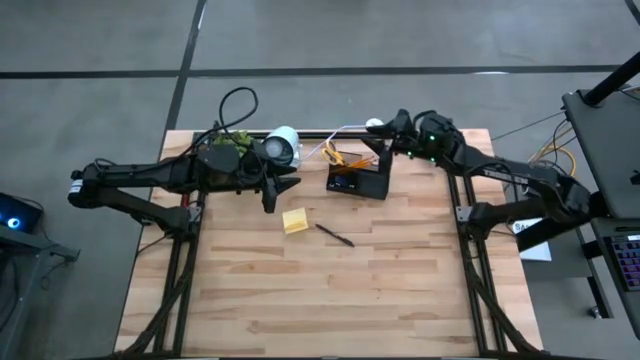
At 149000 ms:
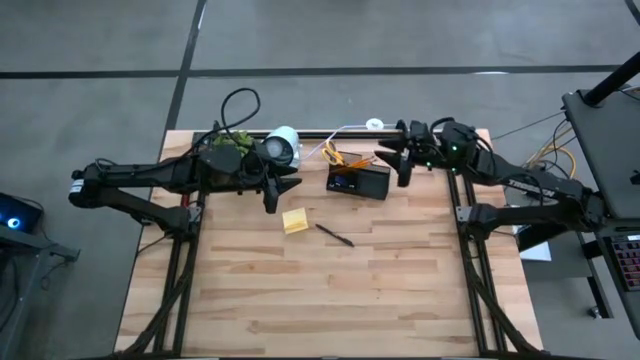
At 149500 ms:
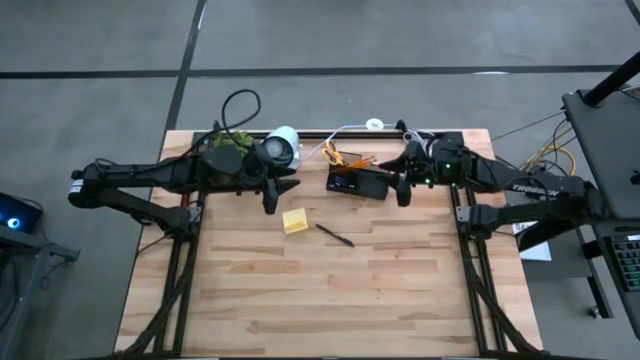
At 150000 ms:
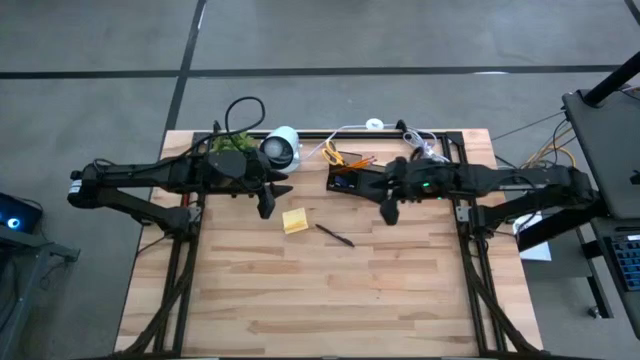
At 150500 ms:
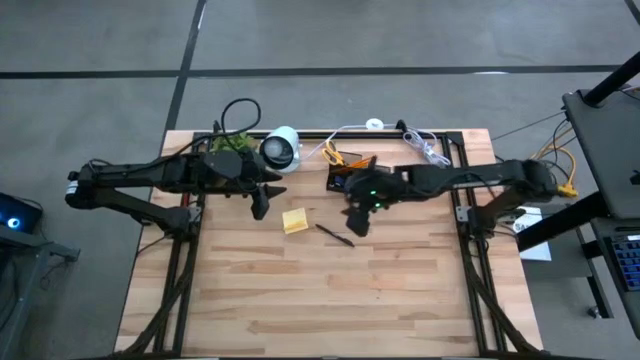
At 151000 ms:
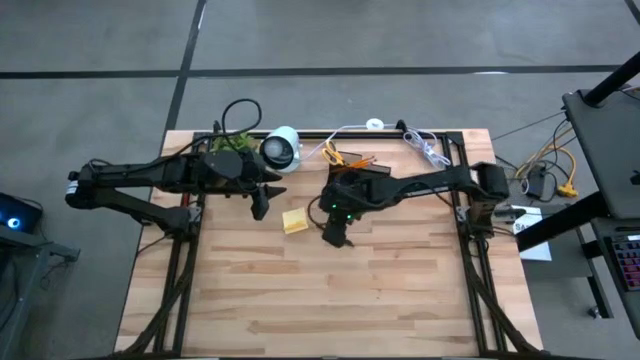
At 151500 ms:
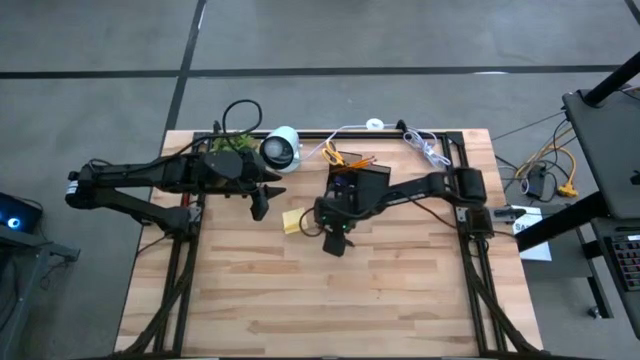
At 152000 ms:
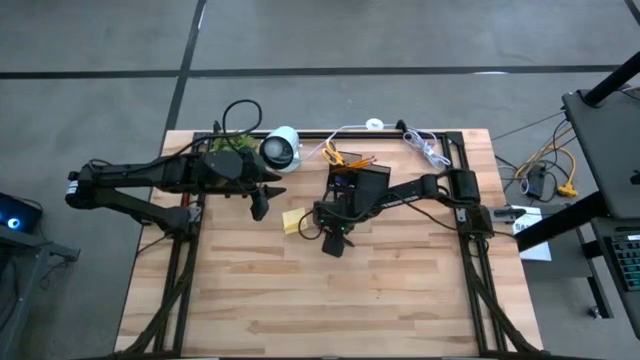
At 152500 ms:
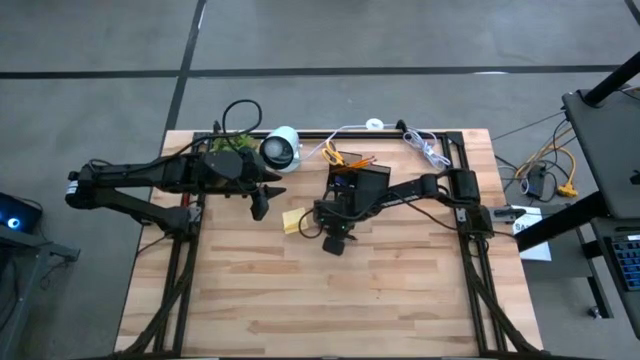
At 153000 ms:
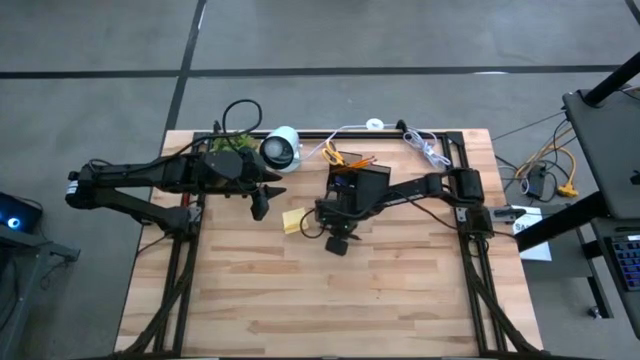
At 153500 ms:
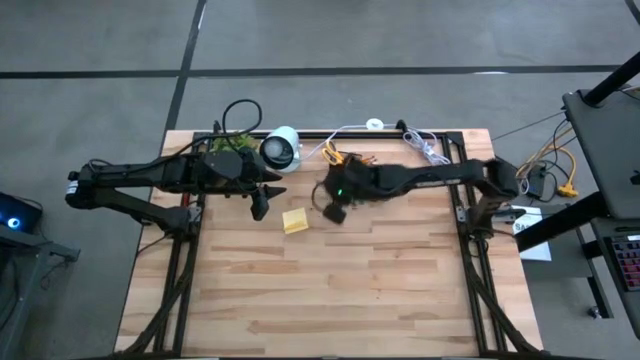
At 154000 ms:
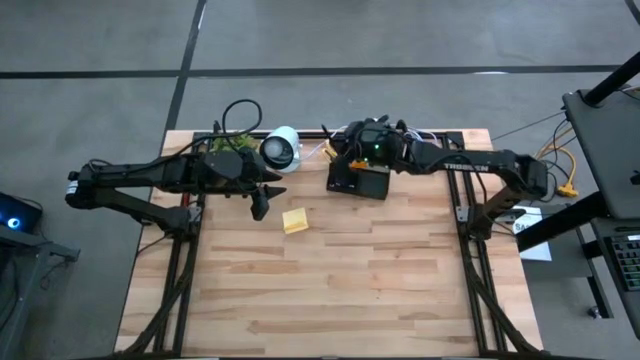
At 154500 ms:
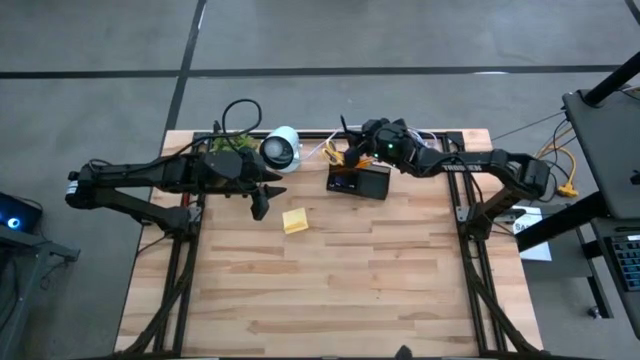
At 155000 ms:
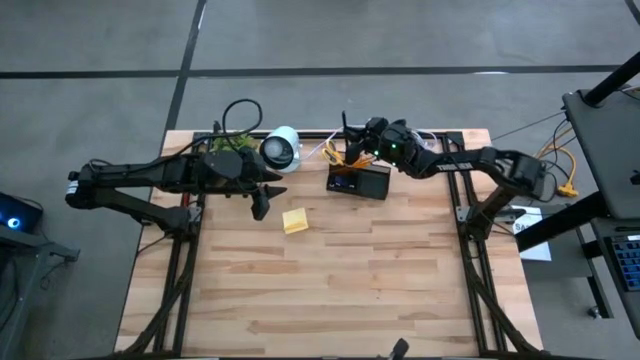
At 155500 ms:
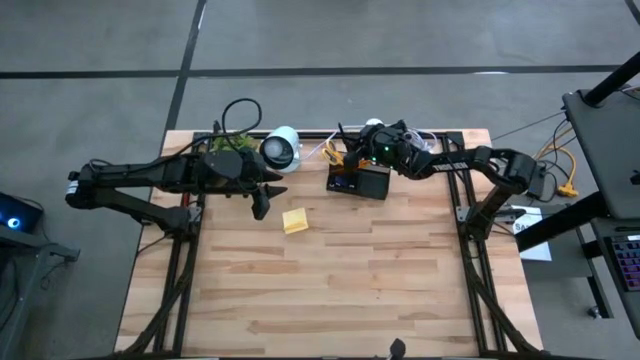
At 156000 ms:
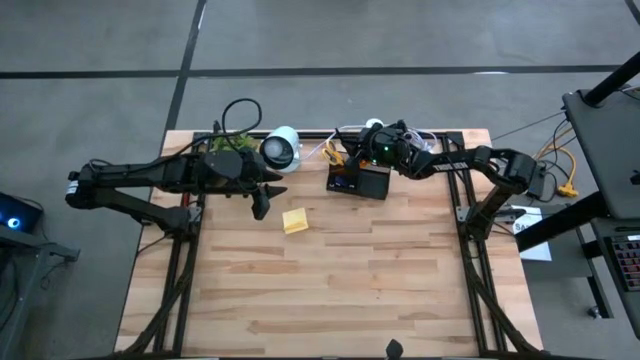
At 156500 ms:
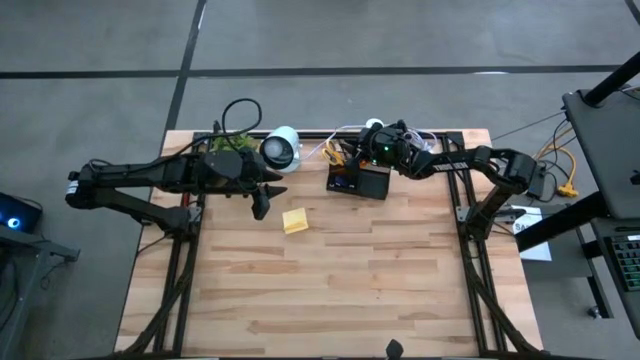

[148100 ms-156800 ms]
Task: Pick and place office supplies into organizer
Put the pen into the desk organizer

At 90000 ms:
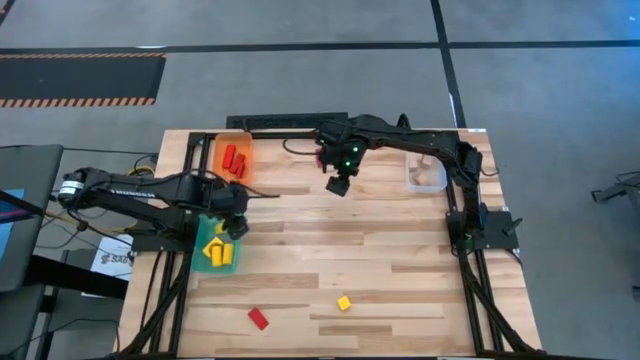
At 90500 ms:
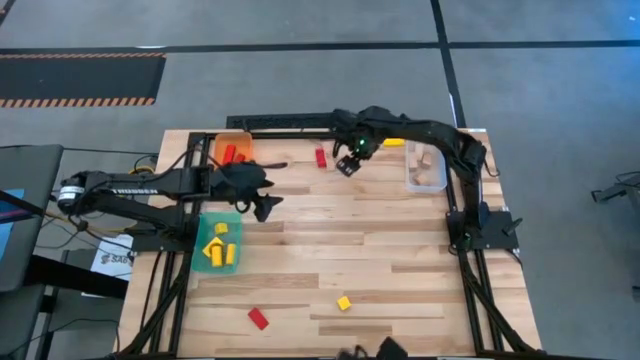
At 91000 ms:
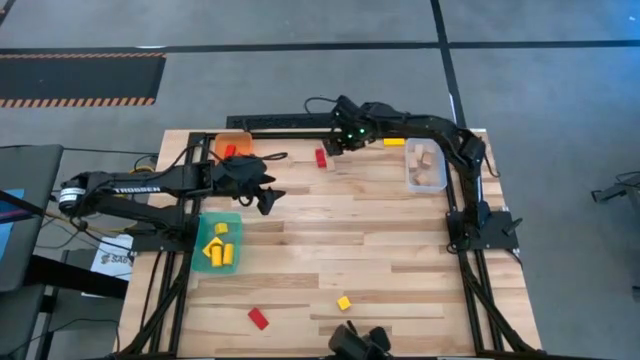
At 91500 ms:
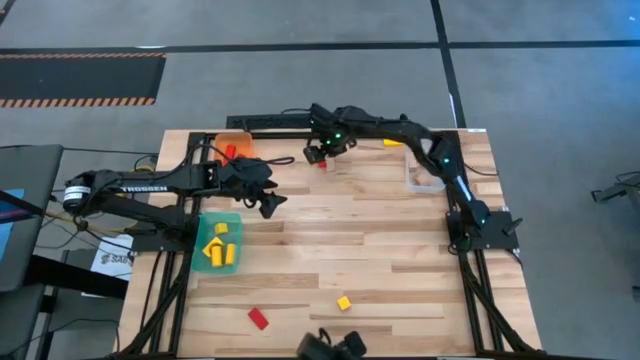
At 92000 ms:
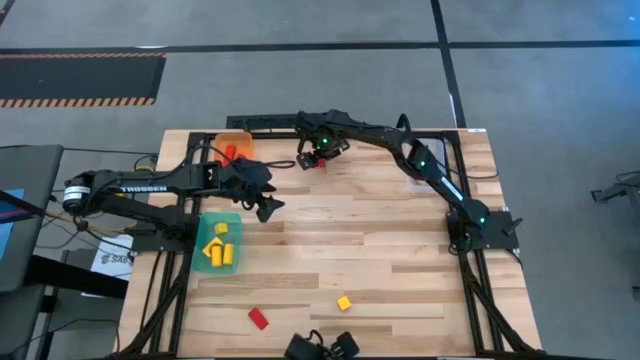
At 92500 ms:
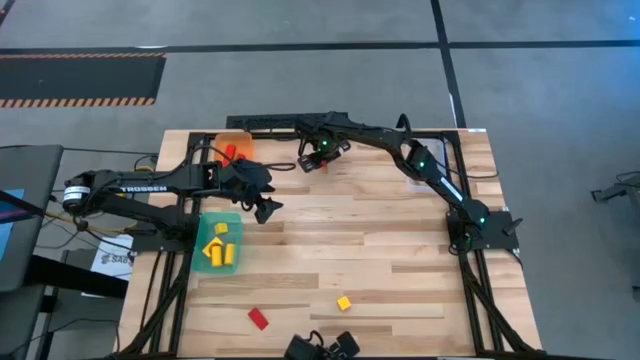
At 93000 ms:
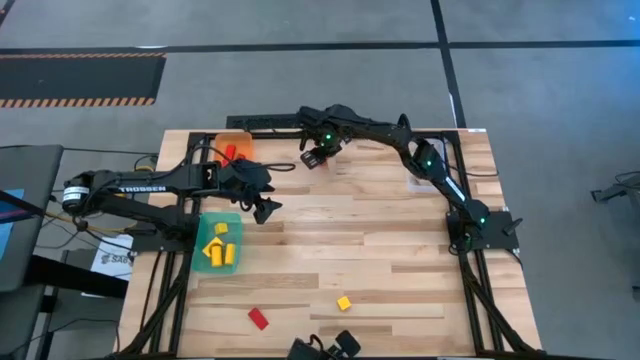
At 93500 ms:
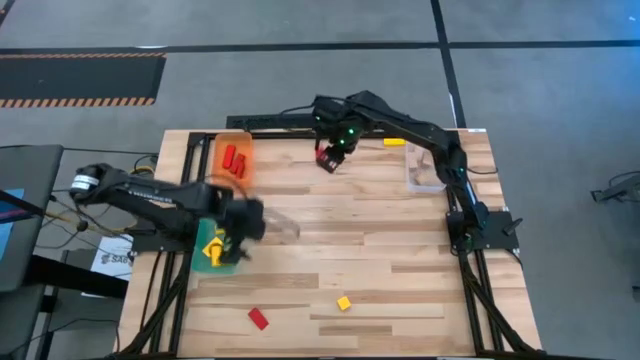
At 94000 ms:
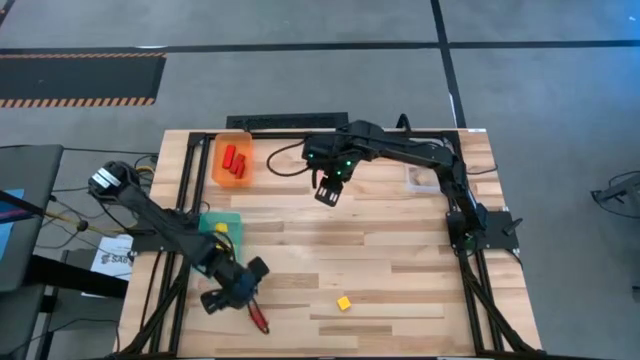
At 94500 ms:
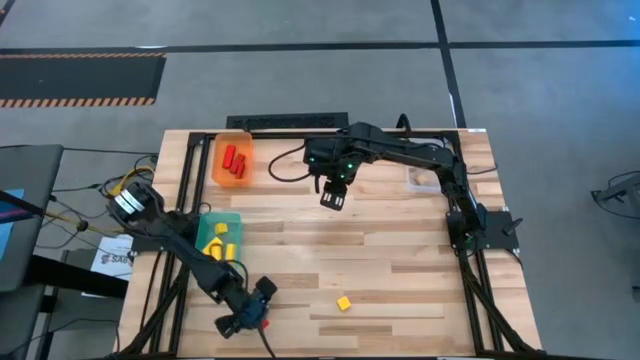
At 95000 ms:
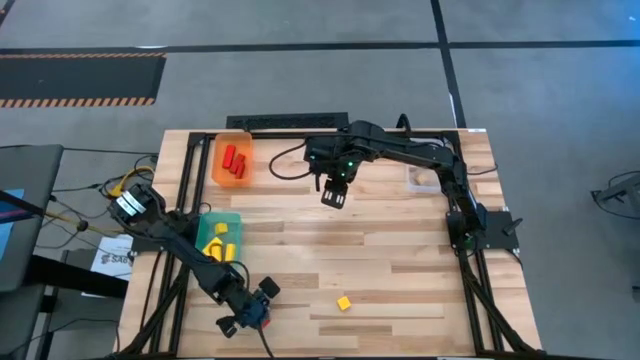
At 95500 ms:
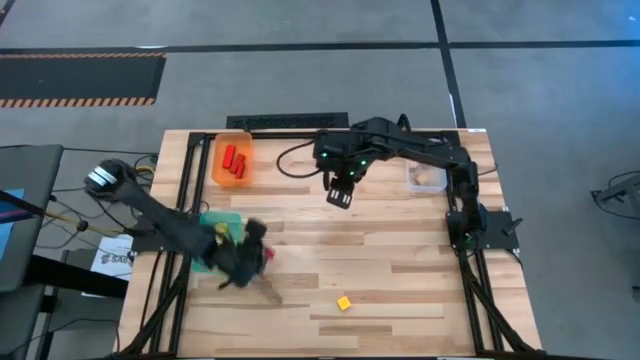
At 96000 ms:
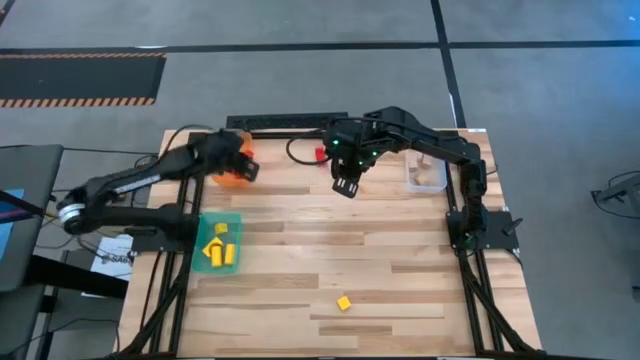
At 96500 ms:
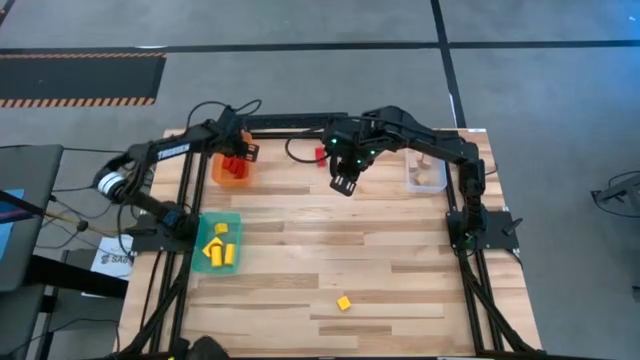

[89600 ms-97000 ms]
Task: Sort & place blocks by color
Put the red wooden block into the orange bin

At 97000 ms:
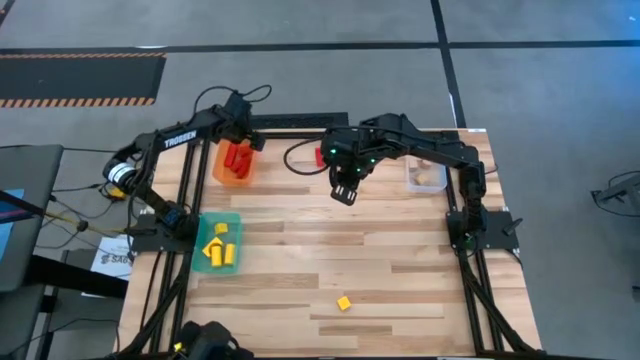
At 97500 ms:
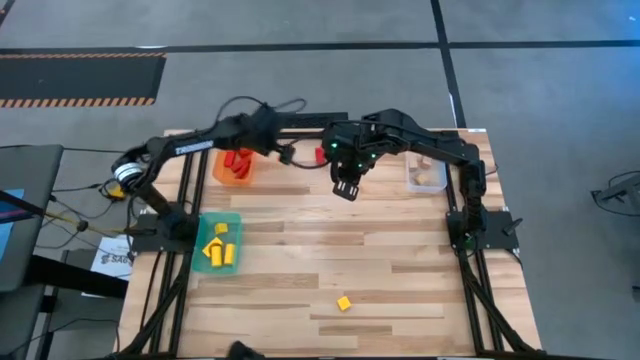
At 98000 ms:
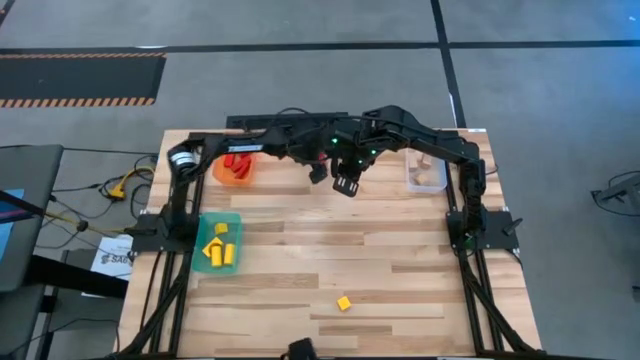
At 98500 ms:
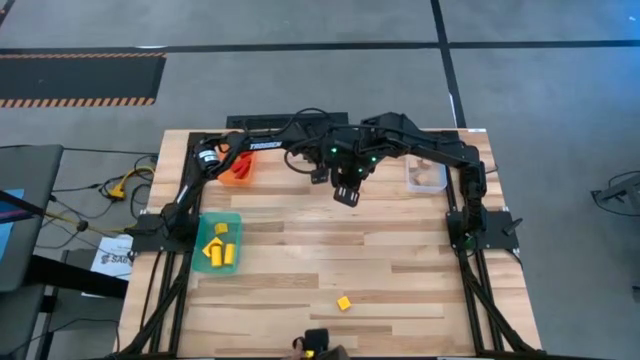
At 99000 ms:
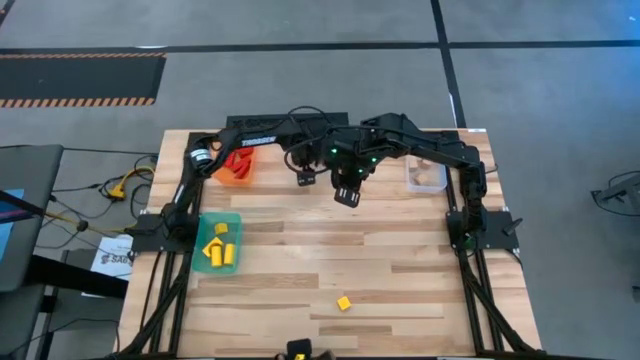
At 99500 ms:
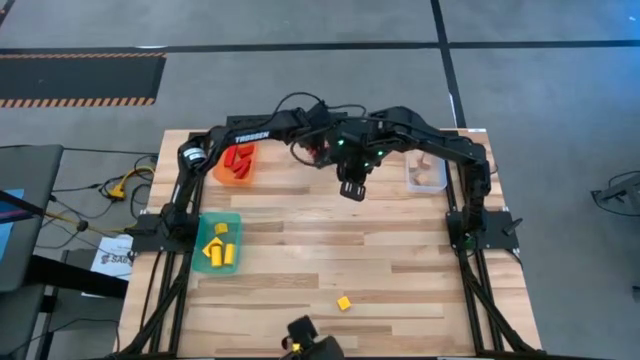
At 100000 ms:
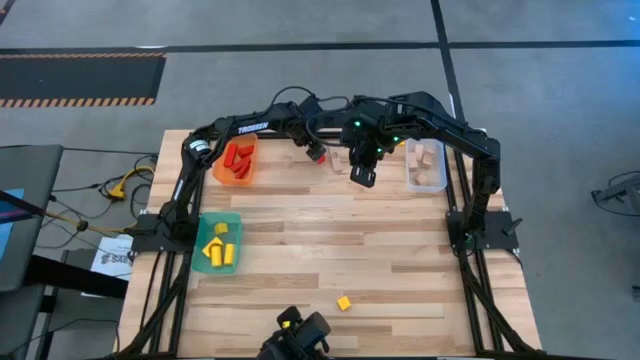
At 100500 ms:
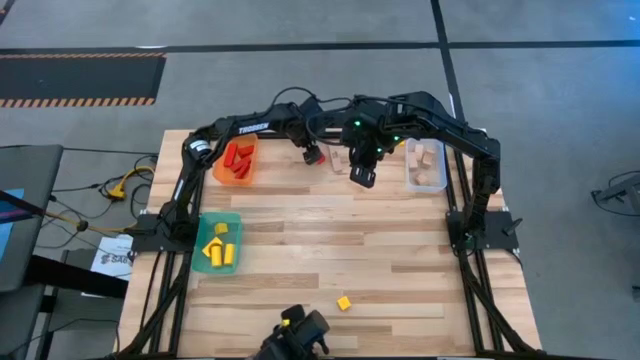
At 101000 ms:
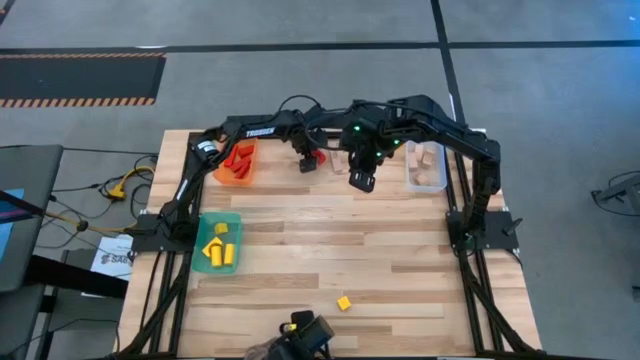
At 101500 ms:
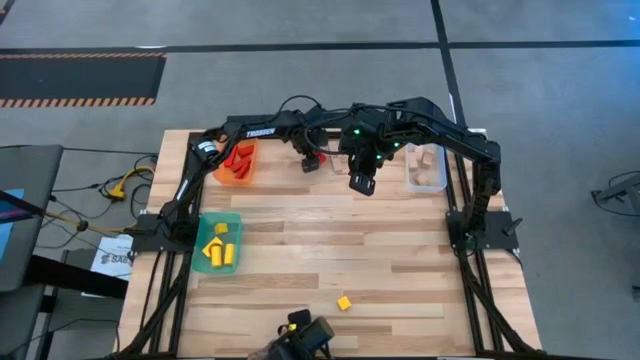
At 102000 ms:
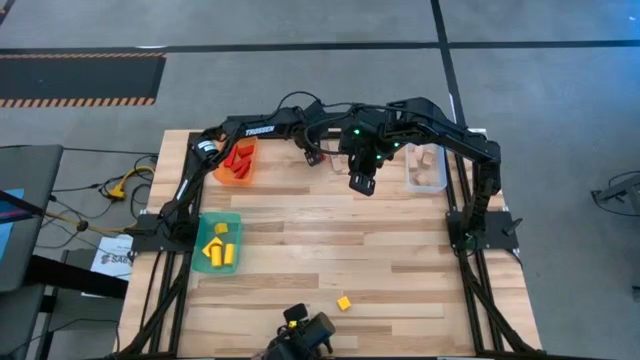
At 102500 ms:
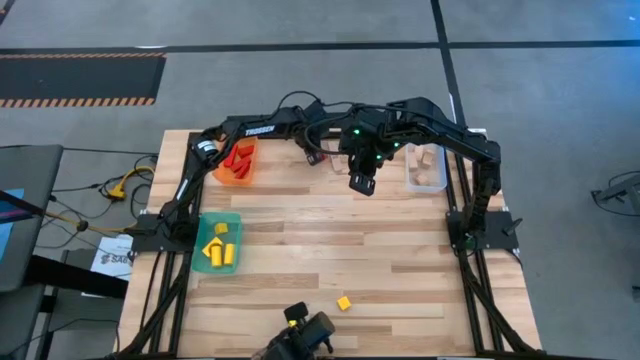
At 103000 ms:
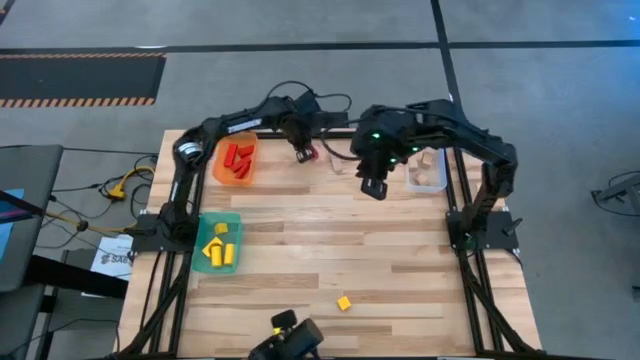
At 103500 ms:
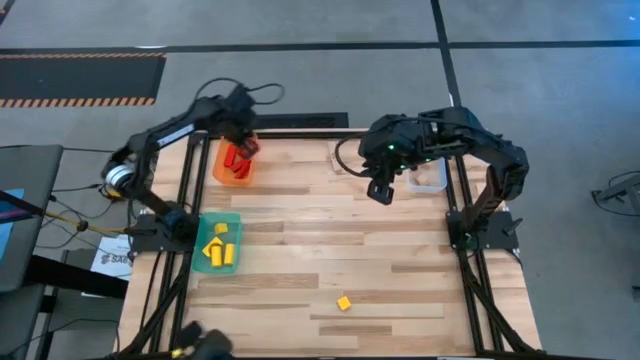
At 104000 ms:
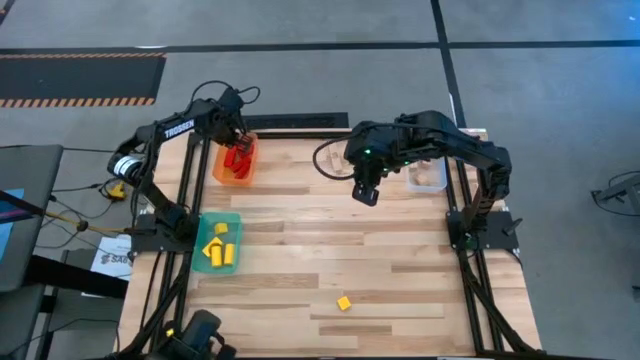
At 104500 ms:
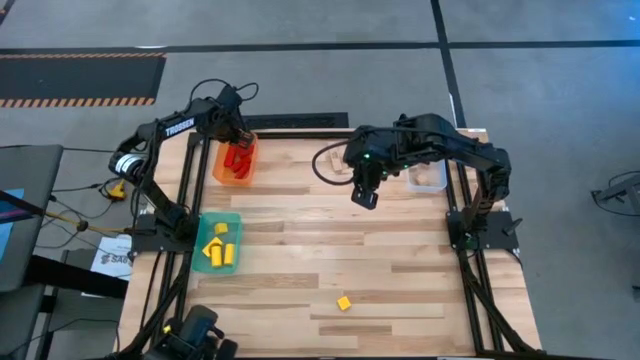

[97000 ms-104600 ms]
Put the red wooden block into the orange bin
